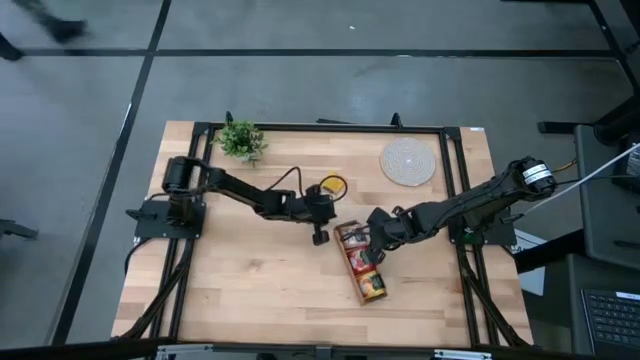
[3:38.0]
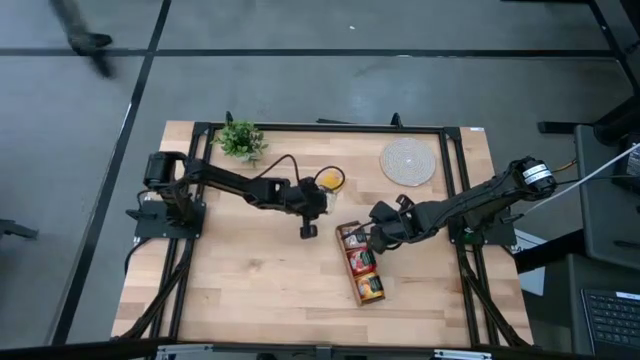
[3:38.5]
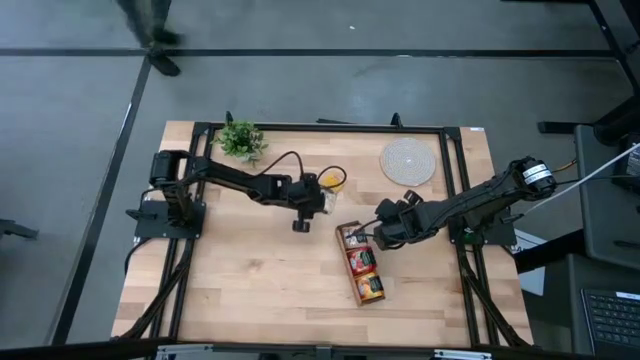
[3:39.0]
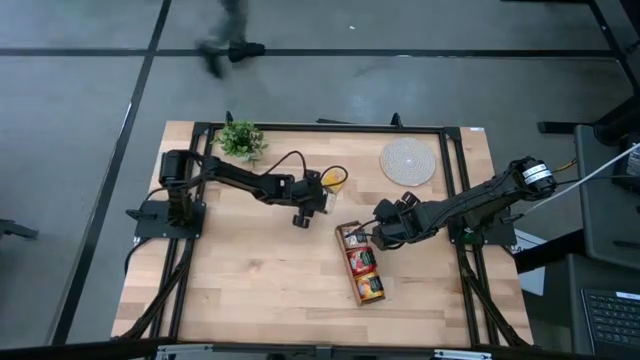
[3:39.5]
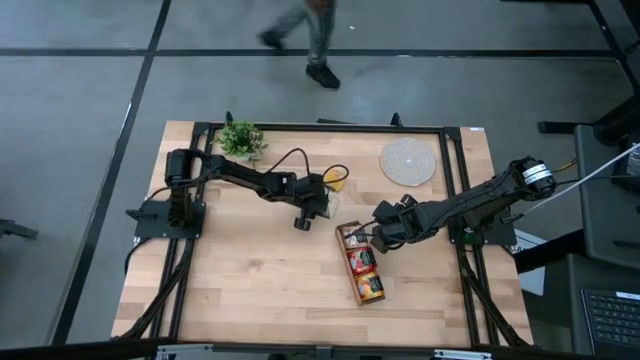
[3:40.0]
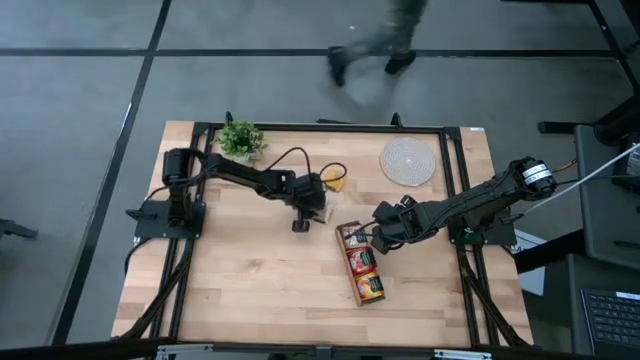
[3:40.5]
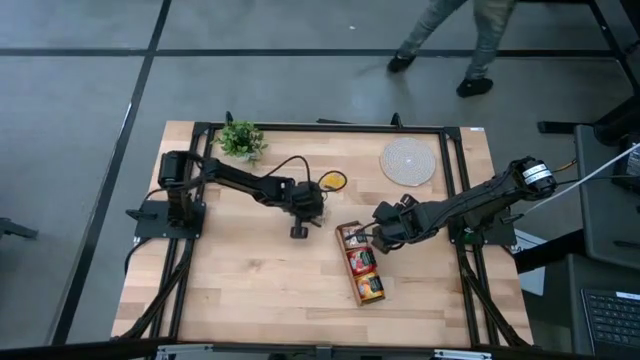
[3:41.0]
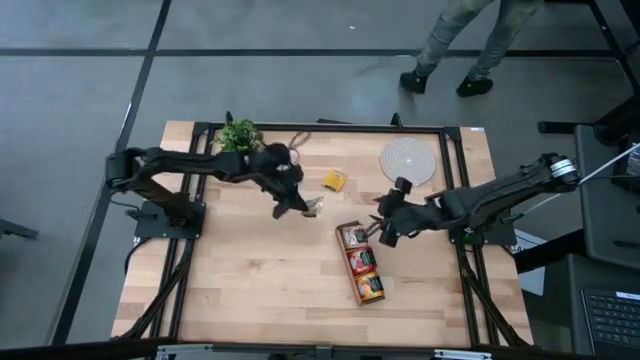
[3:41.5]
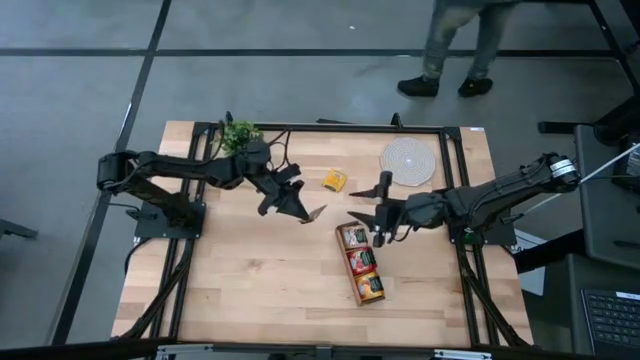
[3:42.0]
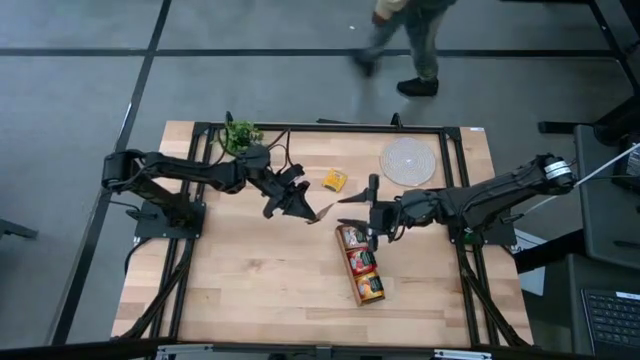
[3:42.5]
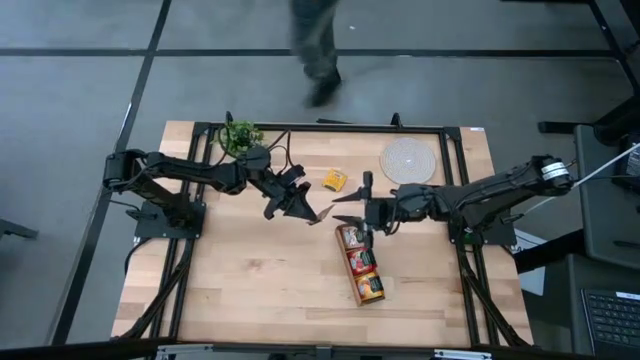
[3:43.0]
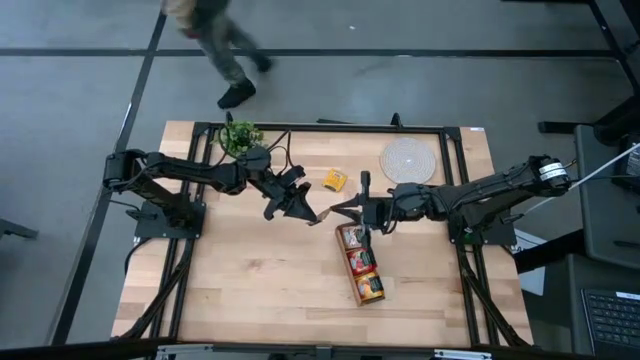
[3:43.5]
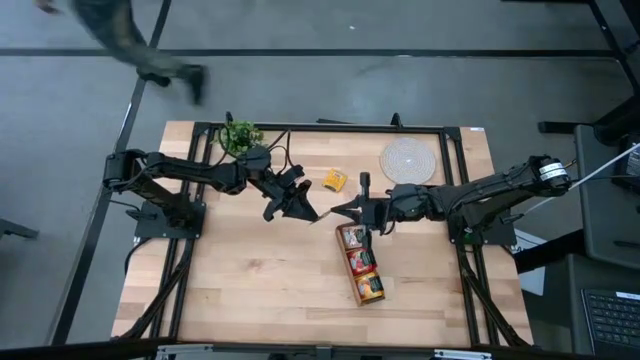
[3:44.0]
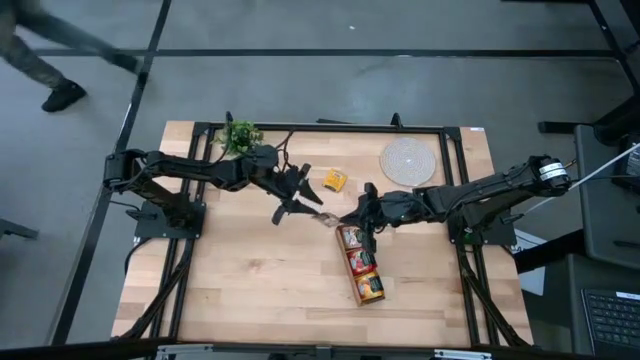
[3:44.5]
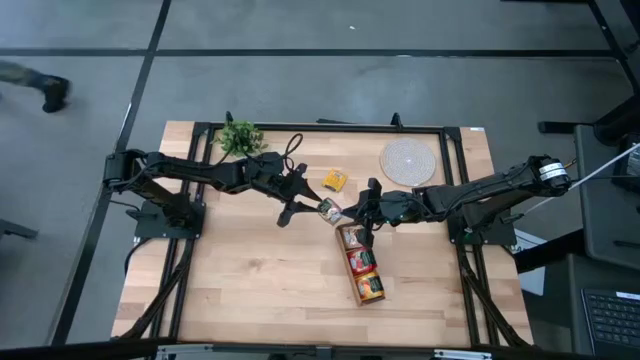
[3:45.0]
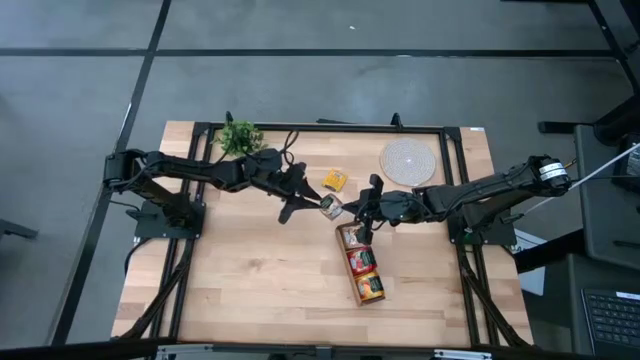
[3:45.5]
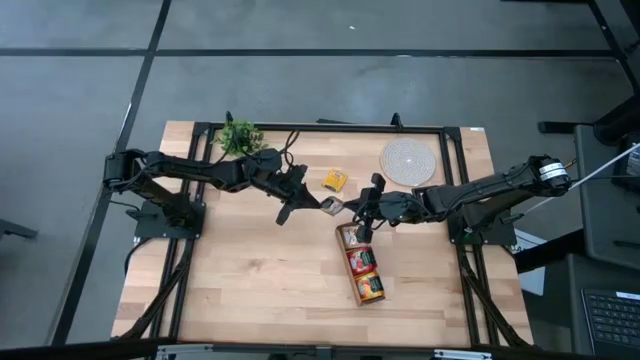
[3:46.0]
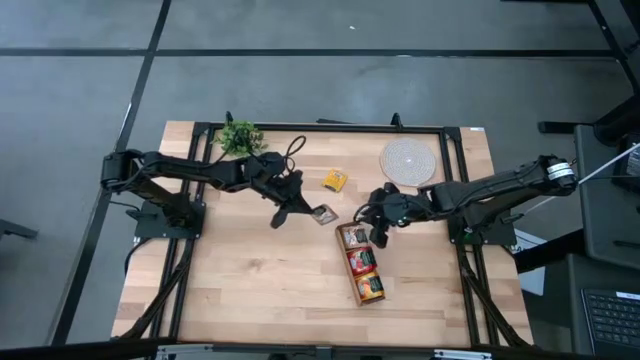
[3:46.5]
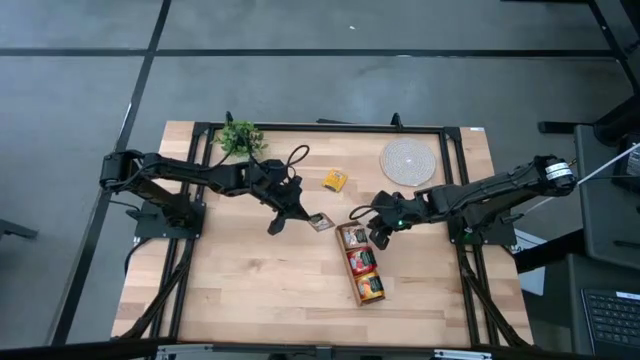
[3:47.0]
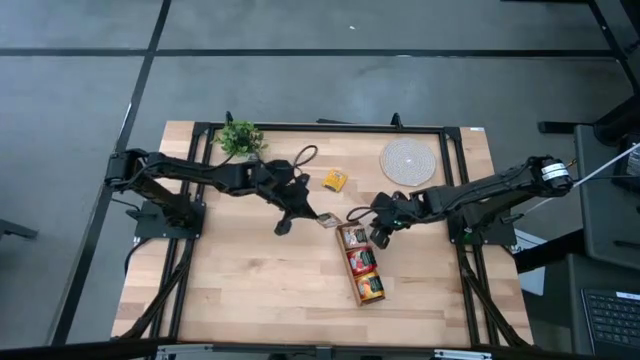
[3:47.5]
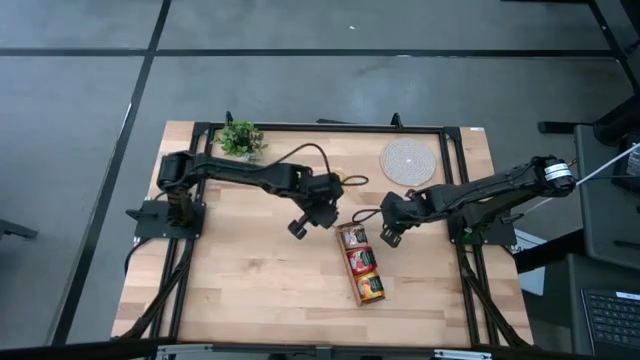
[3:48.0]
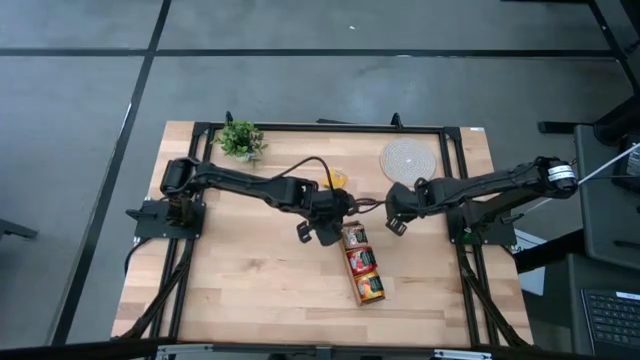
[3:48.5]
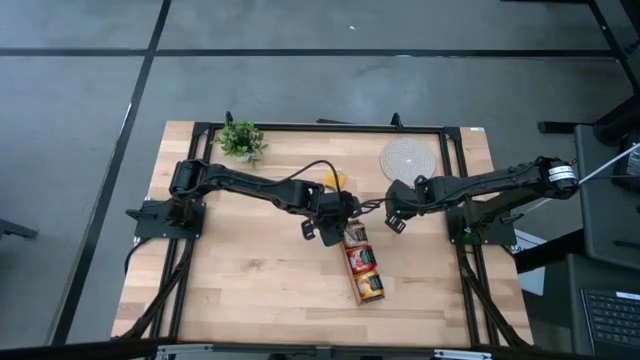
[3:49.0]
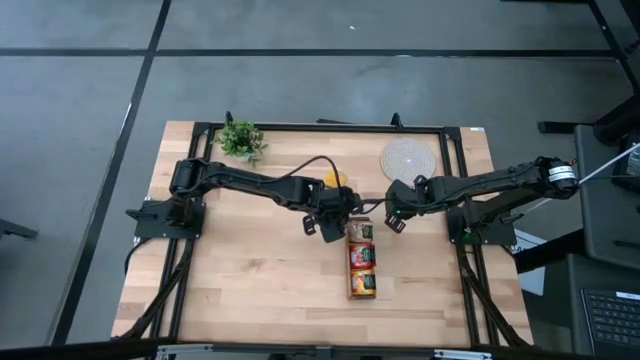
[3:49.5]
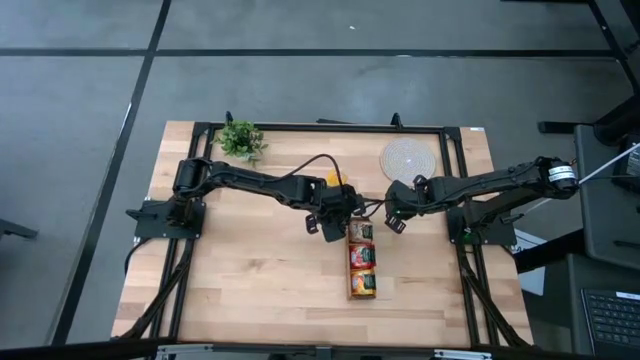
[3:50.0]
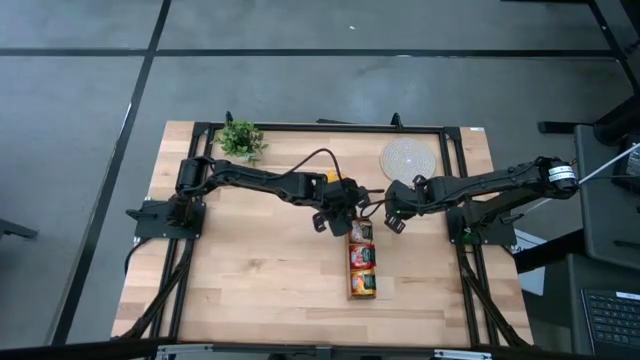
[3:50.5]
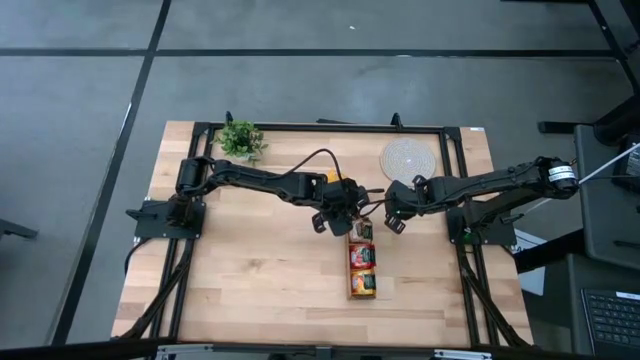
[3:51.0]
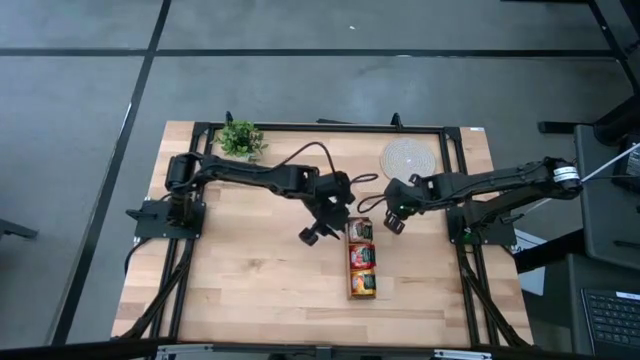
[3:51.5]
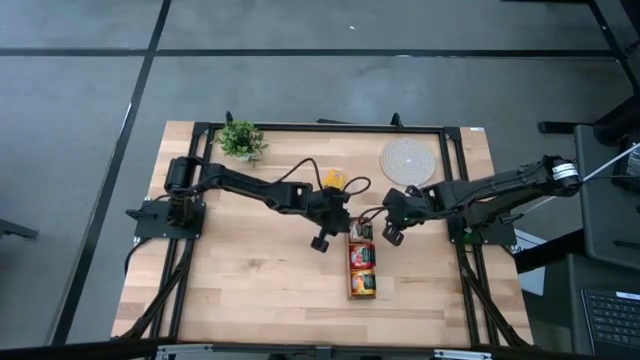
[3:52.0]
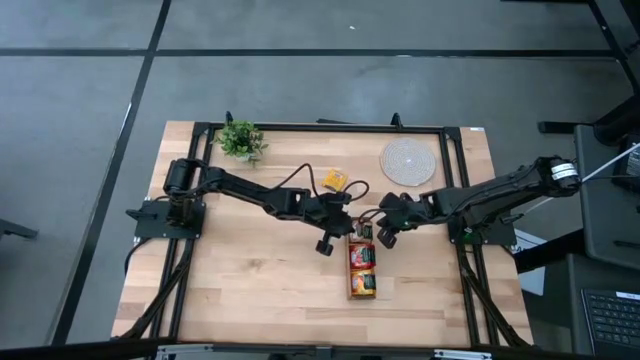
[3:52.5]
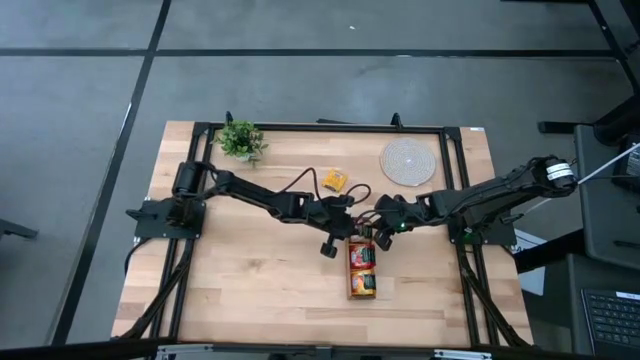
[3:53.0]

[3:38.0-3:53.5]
Task: Pick & Place Tea
Put the brown tea bag into the left section of the wooden organizer

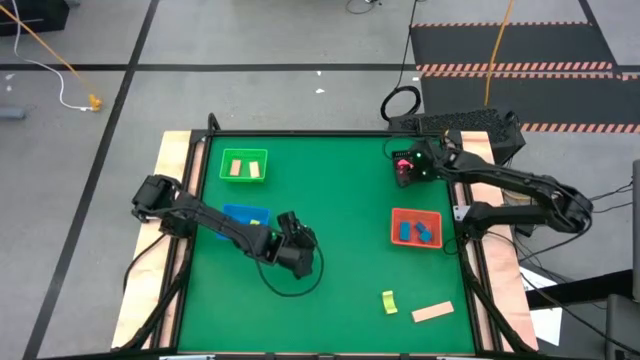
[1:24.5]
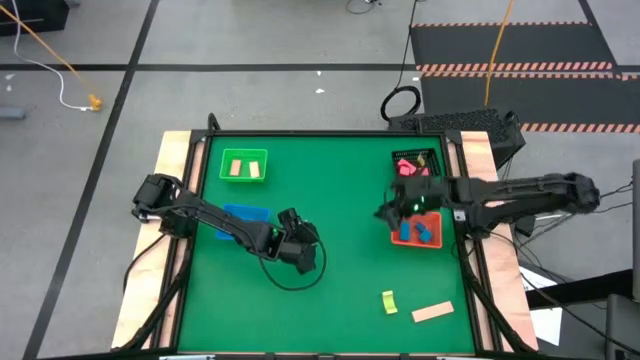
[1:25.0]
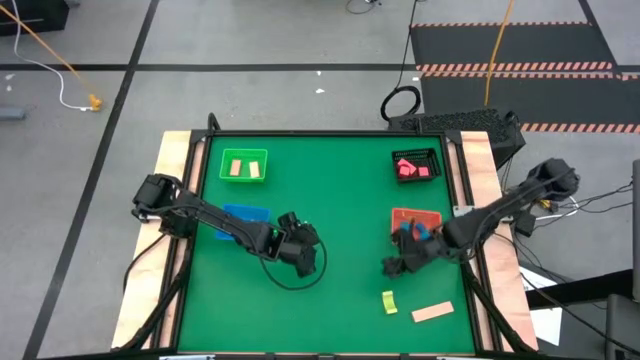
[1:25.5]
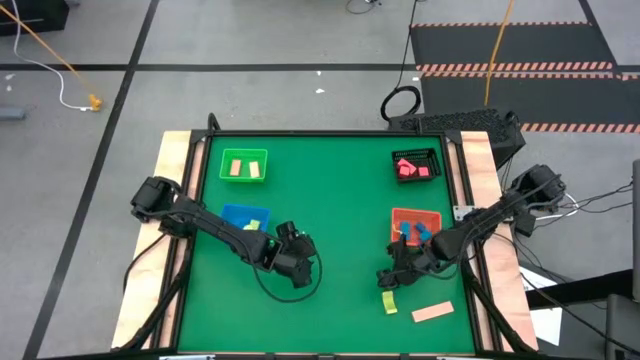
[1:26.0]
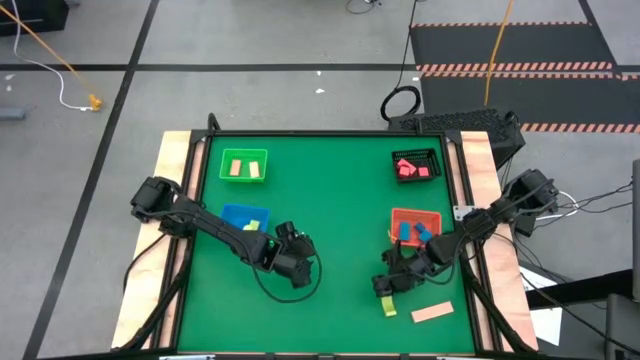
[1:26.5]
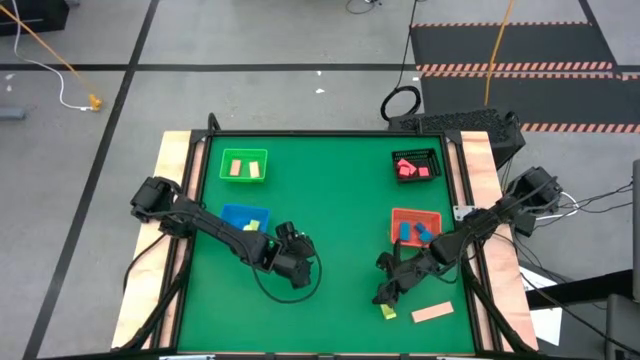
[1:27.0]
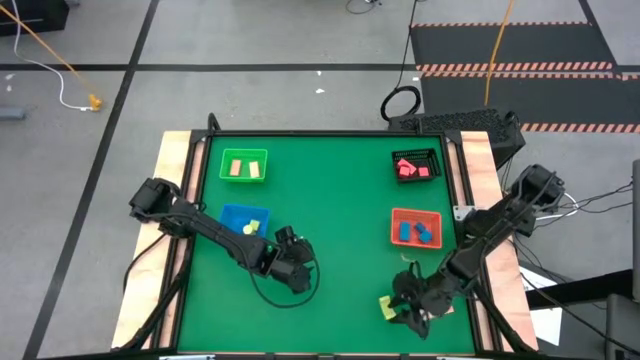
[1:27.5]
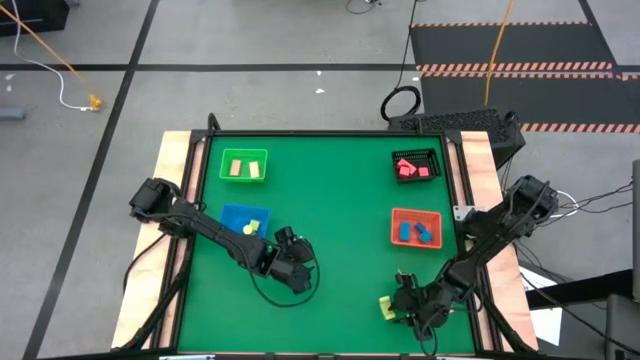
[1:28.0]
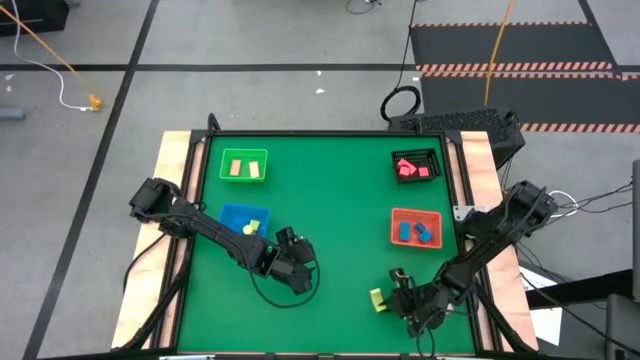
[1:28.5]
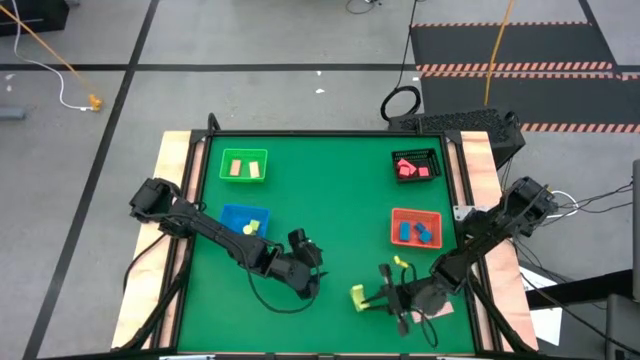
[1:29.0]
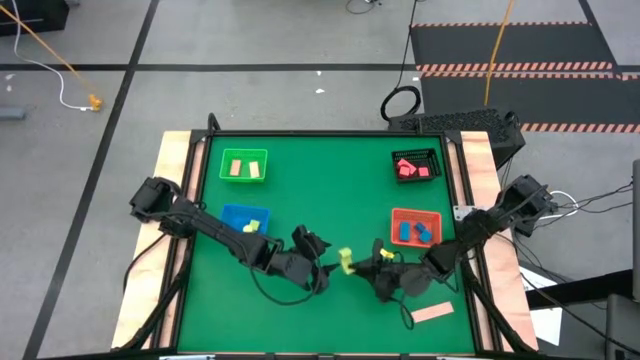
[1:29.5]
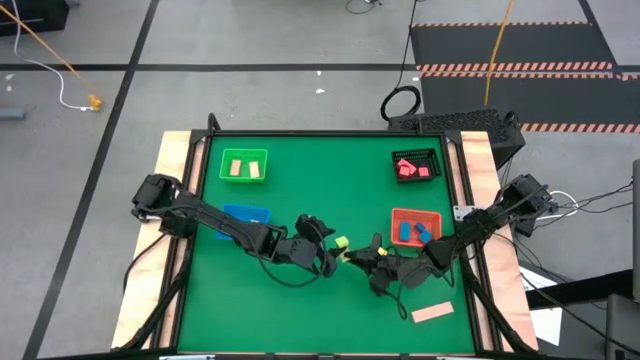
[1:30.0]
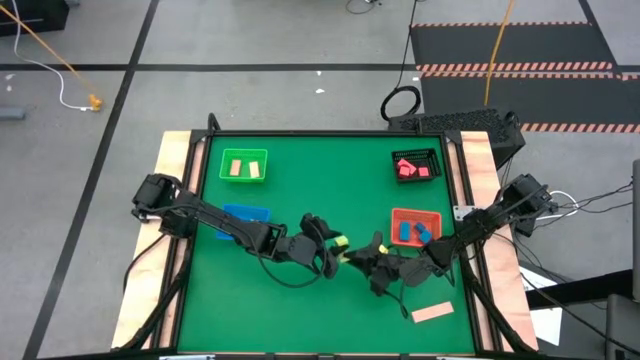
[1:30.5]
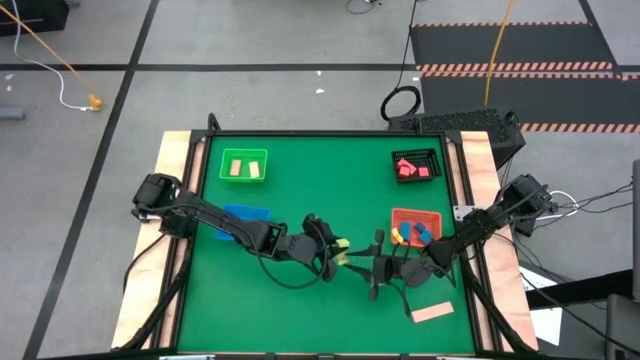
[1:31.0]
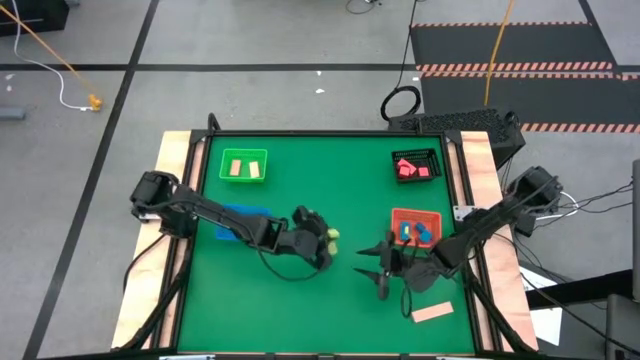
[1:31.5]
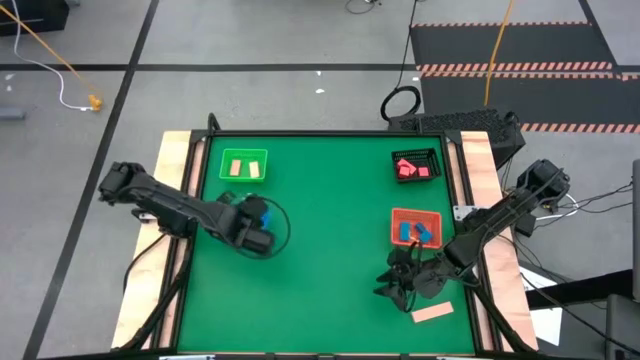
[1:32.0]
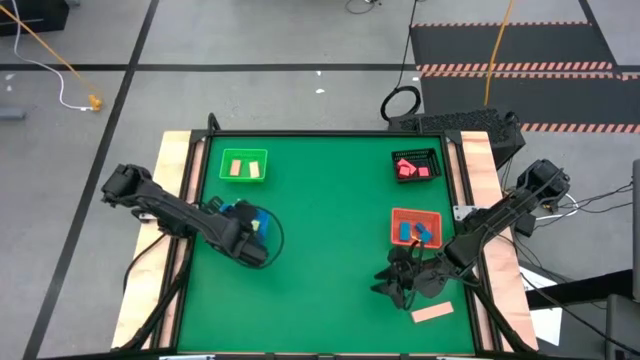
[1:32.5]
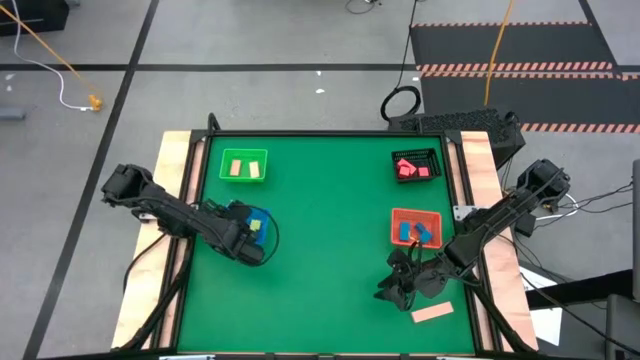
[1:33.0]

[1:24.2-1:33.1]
Task: Sort & place blocks by color
Put the green block into the blue bin
